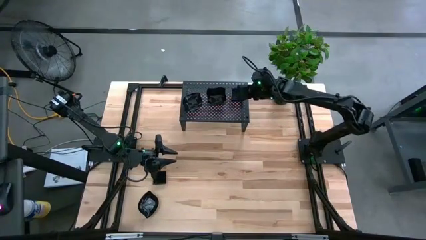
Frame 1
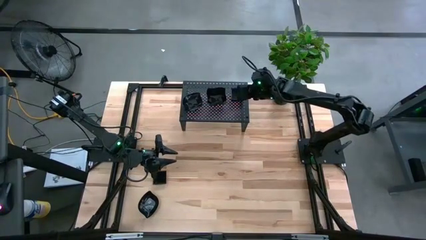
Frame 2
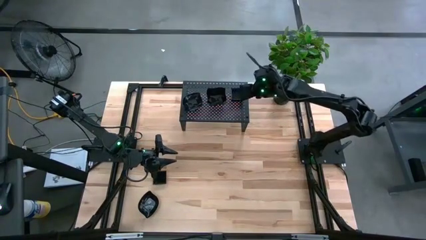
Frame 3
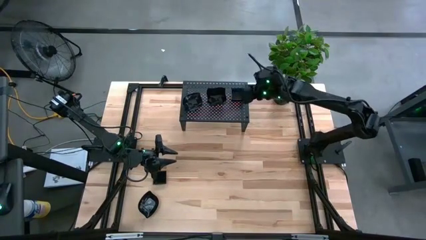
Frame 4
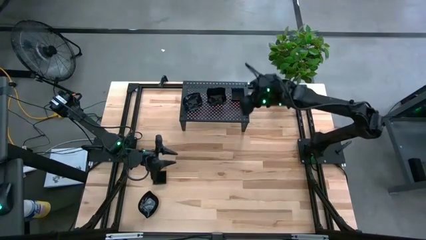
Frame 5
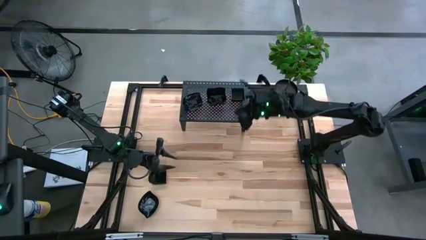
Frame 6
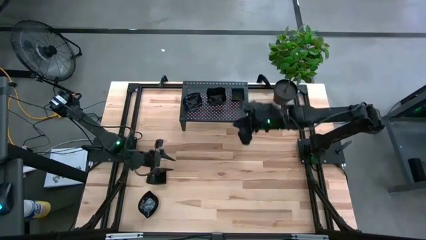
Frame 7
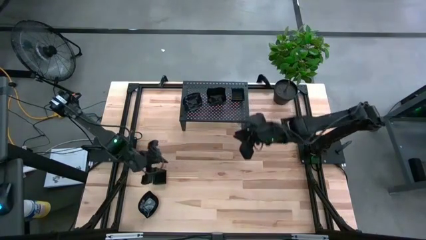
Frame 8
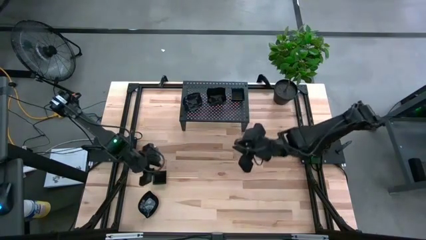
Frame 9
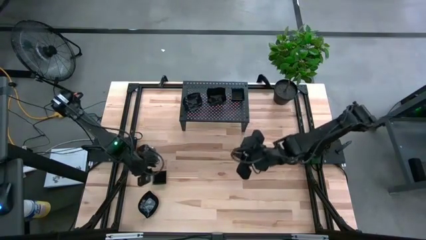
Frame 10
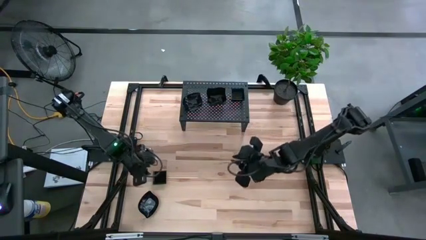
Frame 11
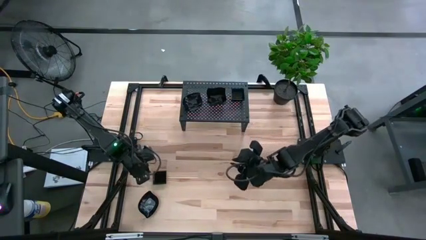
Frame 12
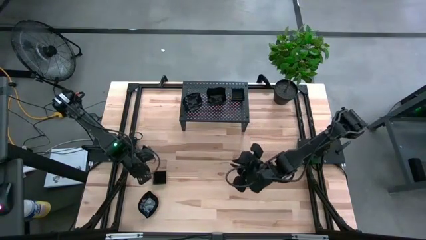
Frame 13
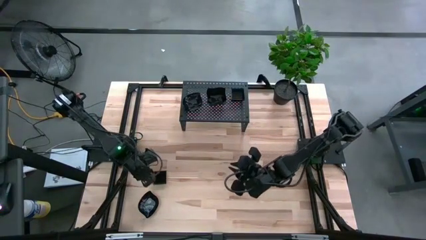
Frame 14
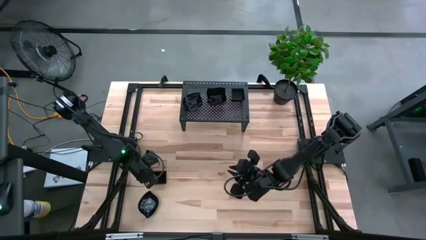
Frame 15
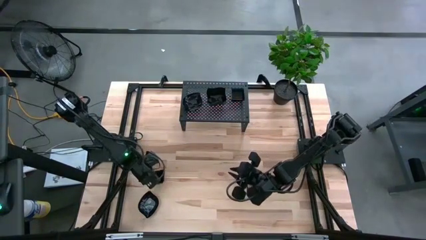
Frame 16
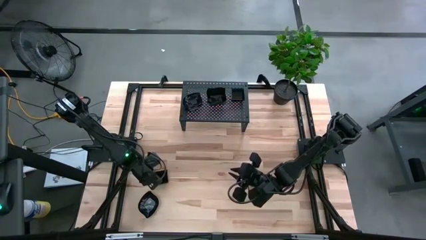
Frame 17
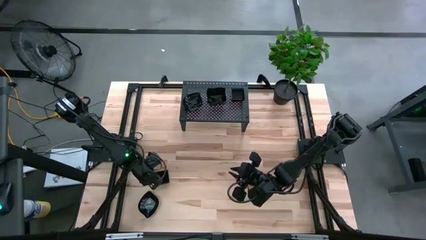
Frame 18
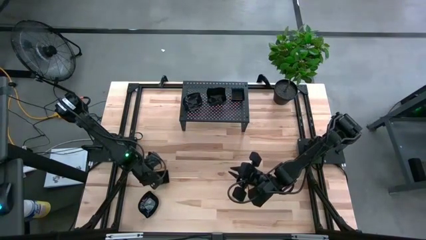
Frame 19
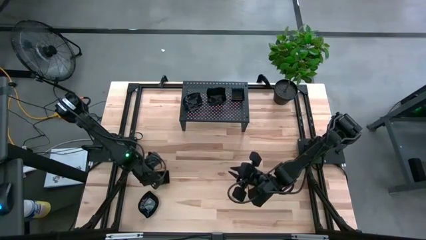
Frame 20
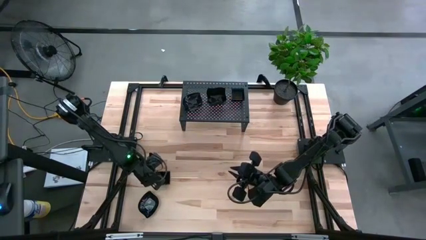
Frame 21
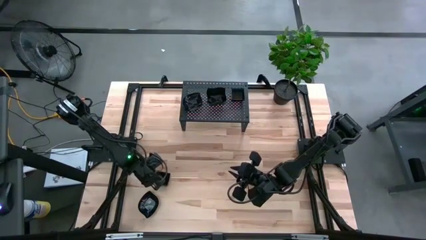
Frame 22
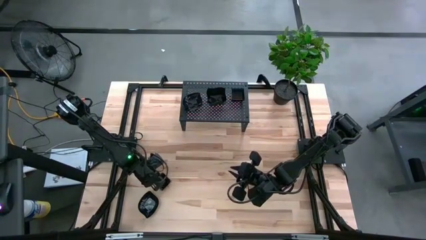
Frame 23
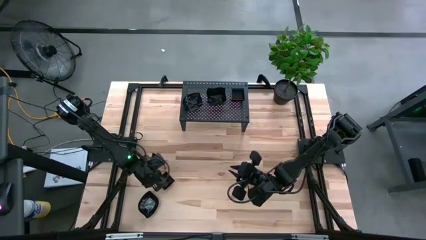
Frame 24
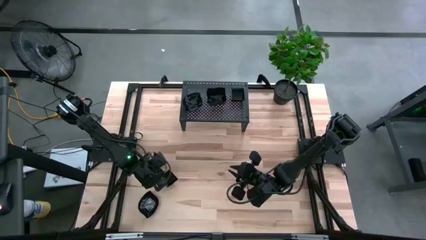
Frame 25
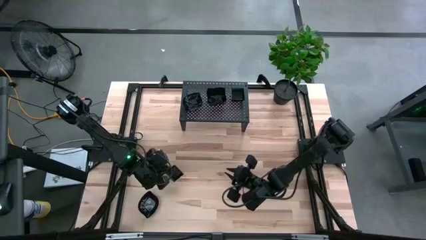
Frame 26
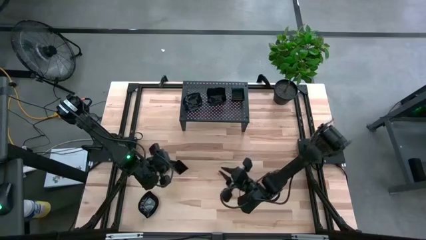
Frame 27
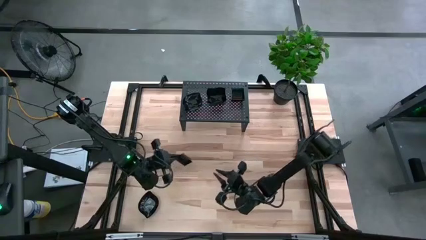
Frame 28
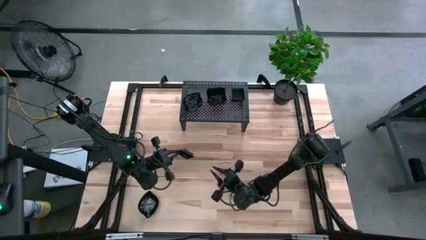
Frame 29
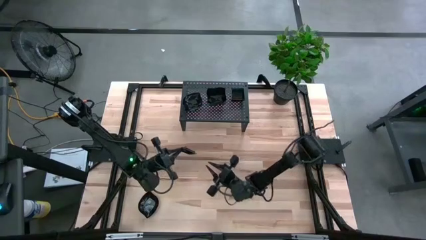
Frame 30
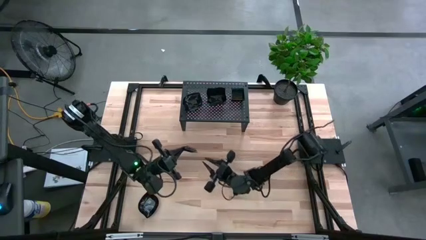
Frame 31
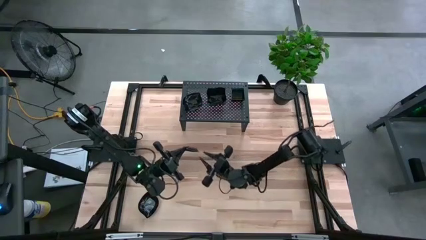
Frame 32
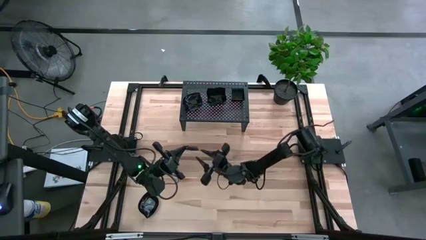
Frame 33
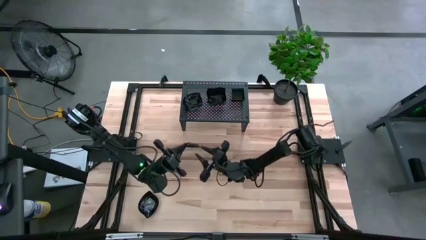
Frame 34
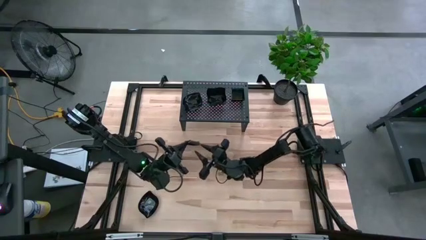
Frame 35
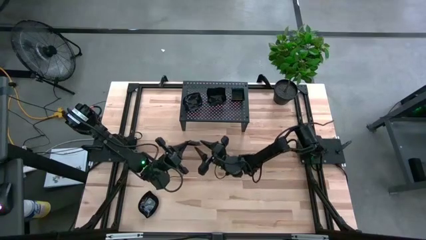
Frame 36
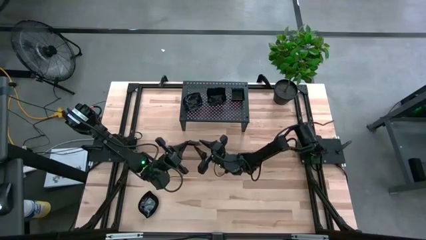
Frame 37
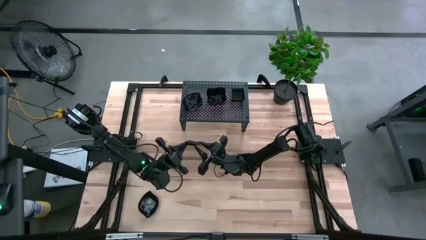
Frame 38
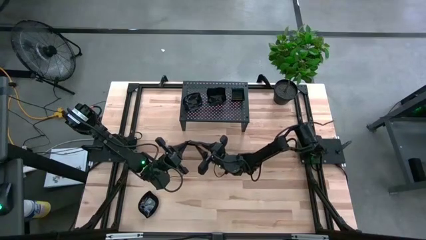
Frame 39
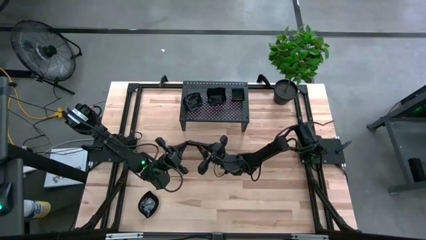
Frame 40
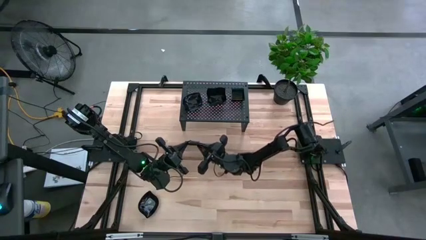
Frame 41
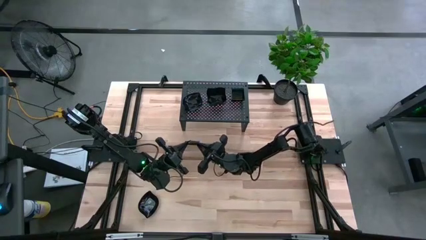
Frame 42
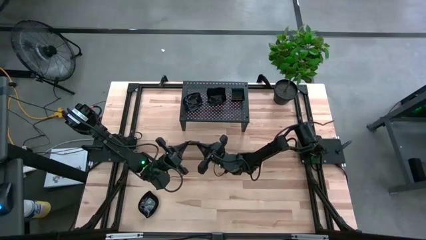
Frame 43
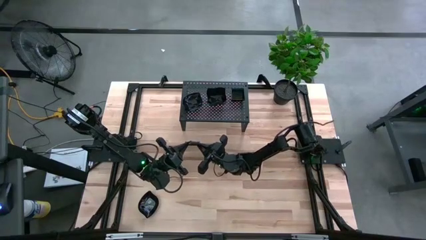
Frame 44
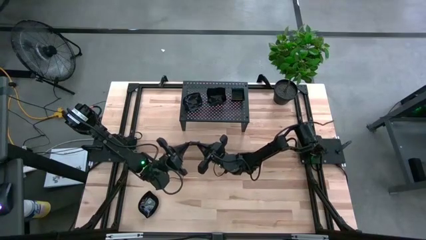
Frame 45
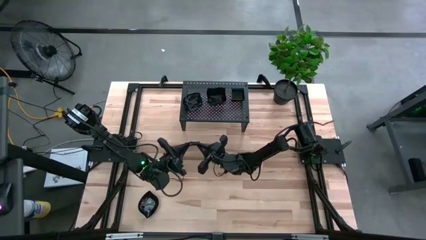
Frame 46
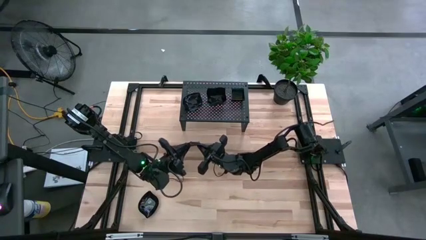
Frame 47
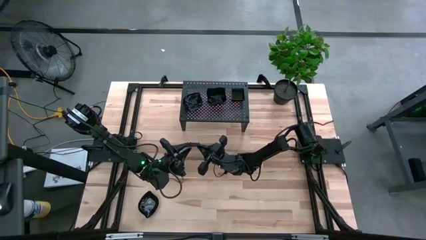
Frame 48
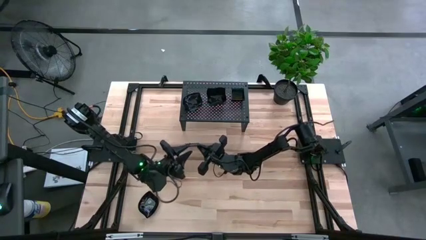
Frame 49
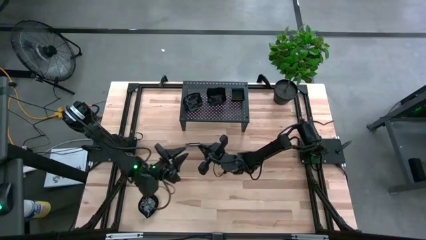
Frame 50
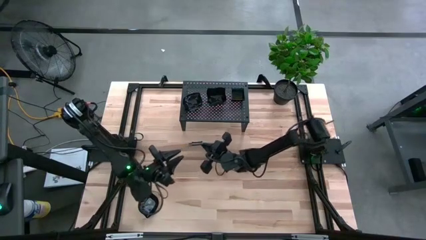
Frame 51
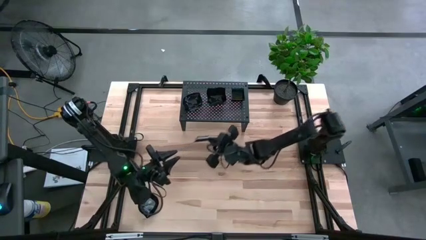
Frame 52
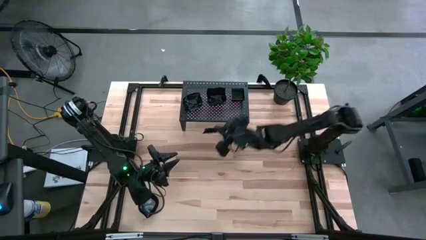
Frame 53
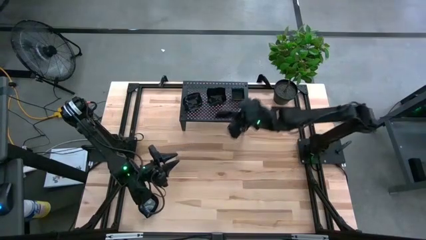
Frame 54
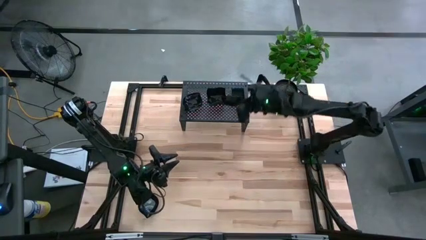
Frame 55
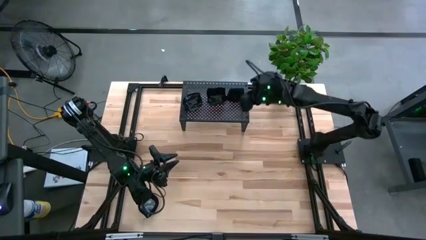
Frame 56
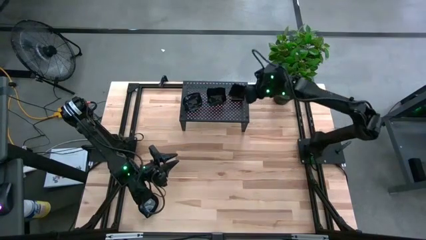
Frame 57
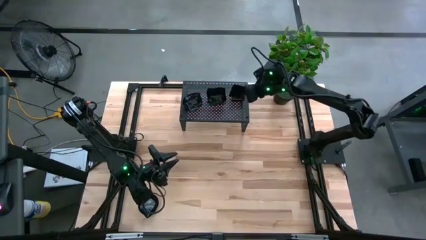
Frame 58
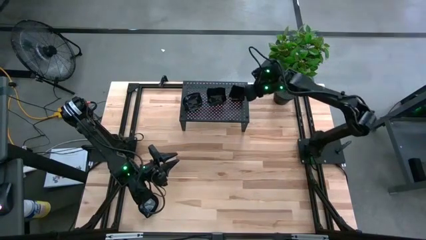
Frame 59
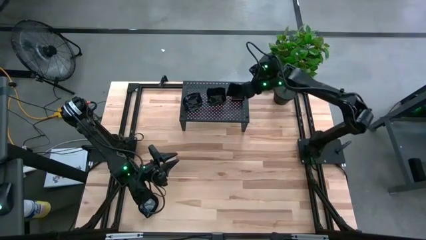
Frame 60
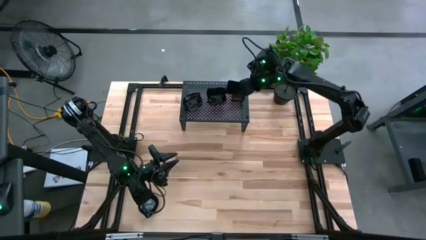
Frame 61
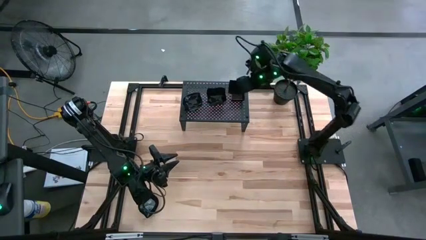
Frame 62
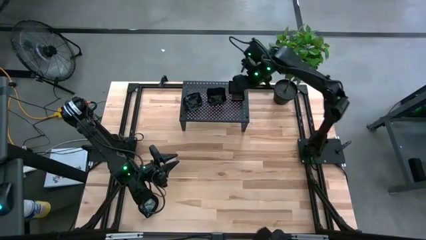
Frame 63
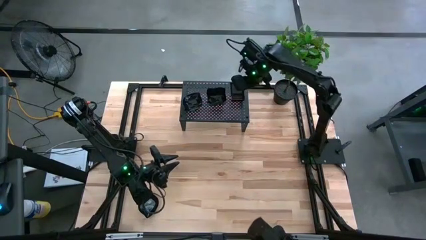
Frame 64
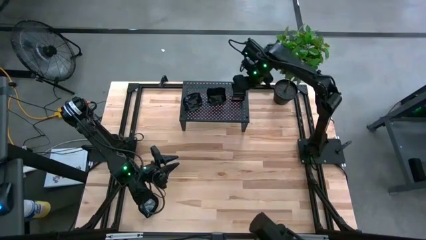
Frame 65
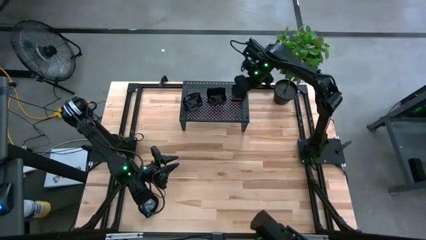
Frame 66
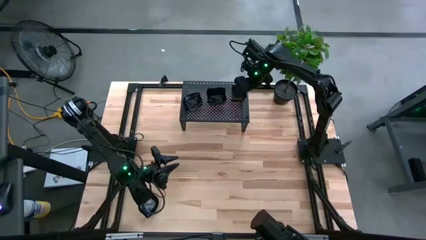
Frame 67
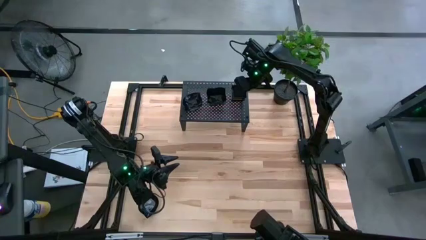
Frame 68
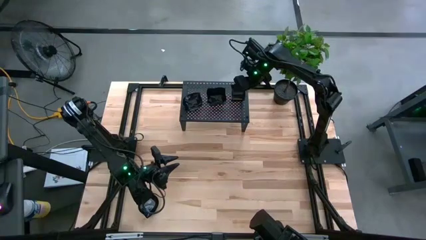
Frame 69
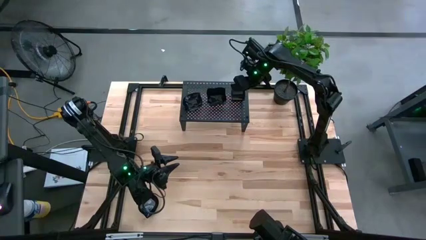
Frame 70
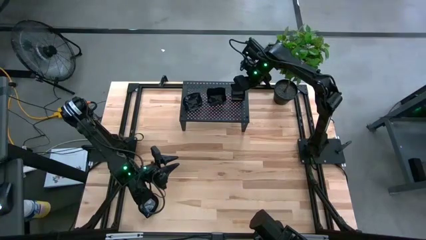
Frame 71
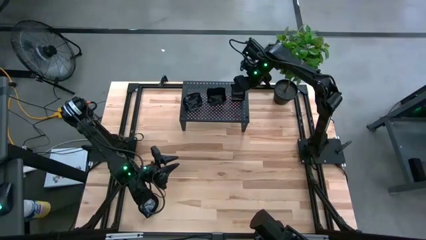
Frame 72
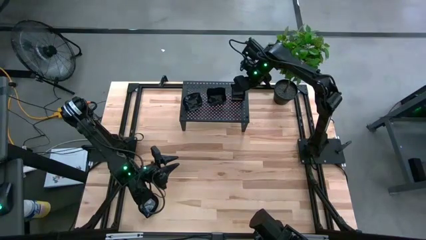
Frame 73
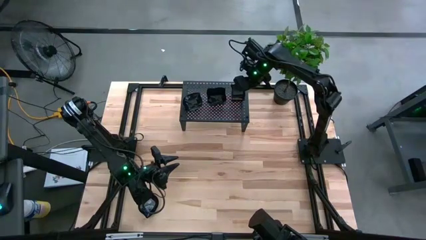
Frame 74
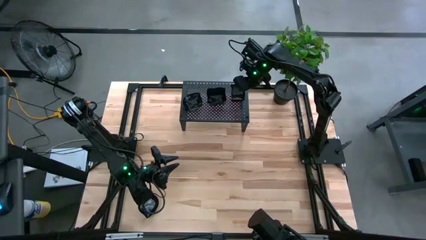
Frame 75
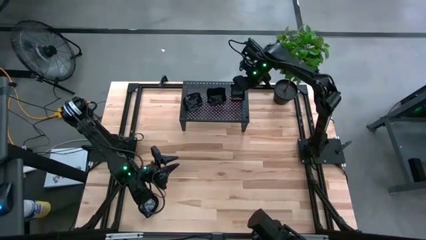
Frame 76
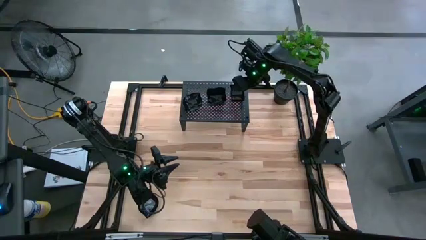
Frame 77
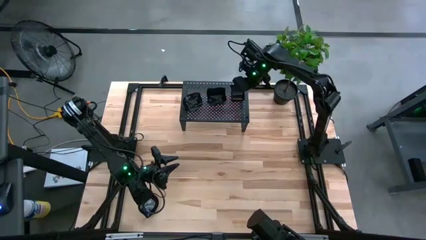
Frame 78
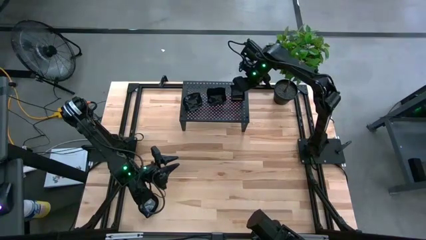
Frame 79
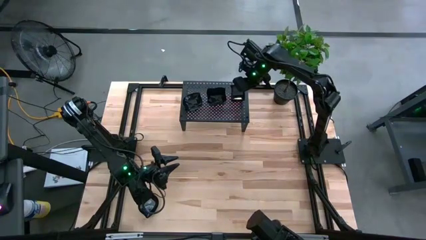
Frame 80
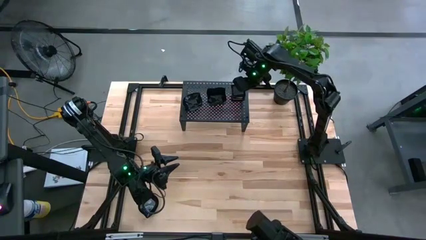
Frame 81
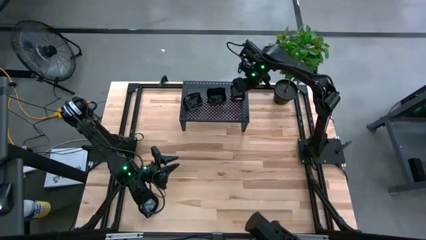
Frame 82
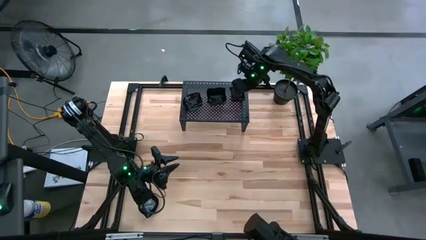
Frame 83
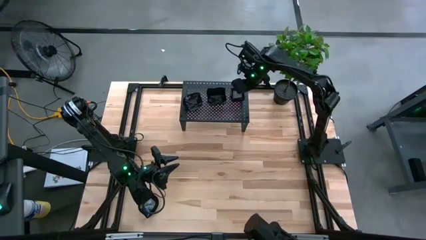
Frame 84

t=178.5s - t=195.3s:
Task: Pick & Place Mini shaped plates
Stack the square plate on top of the square plate on the shelf
